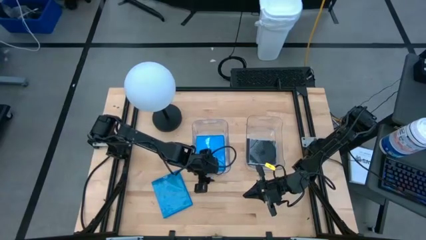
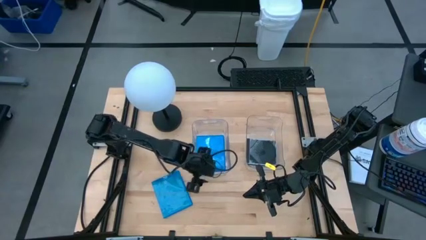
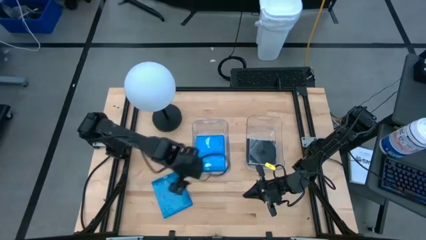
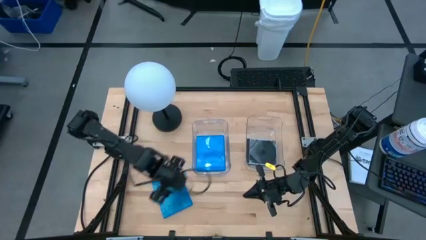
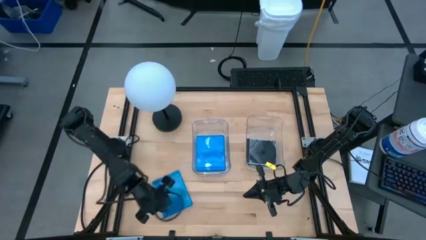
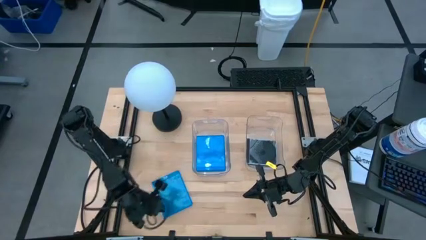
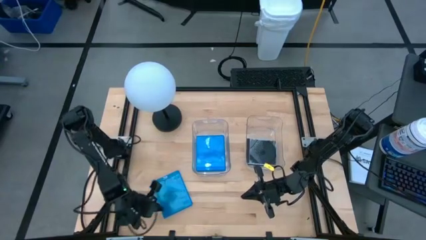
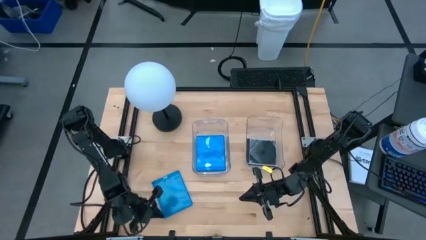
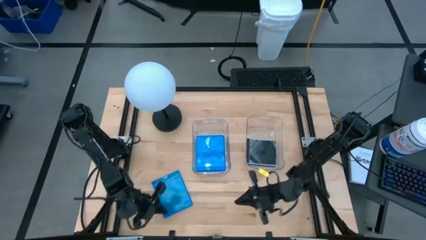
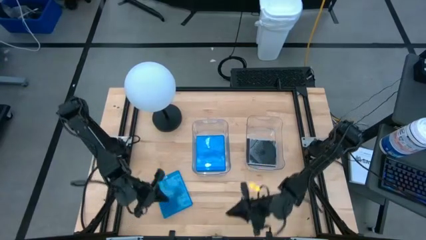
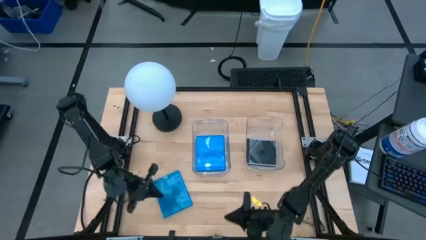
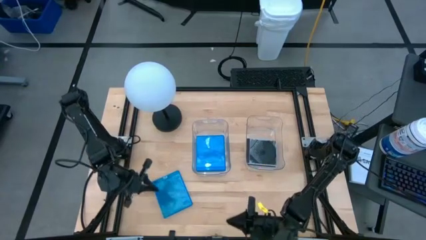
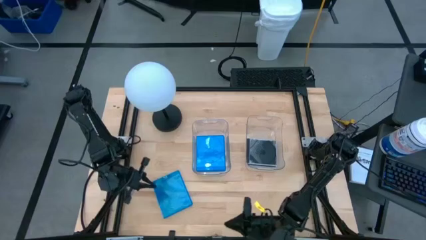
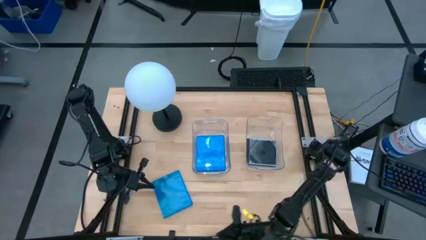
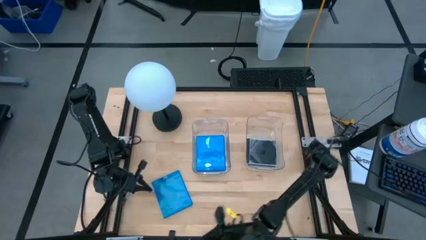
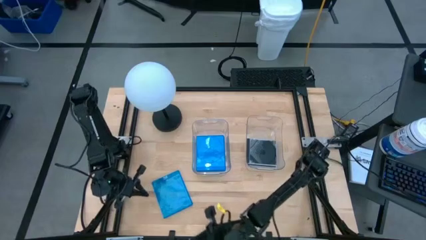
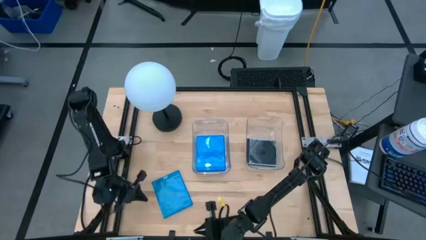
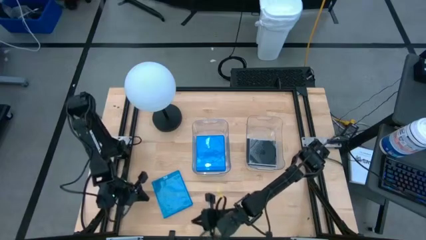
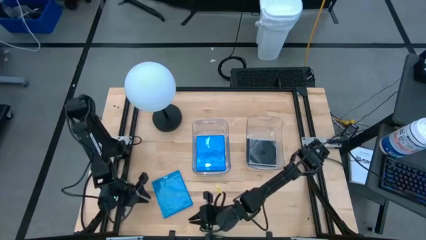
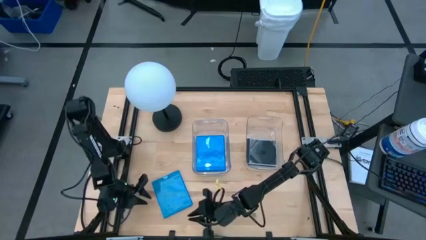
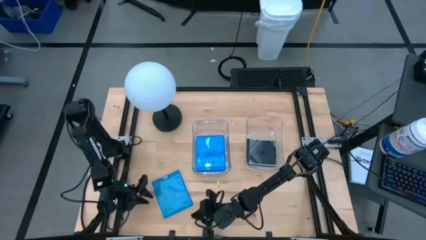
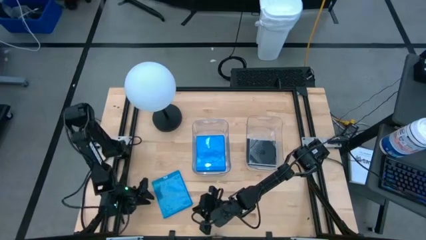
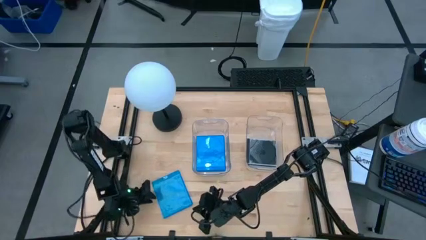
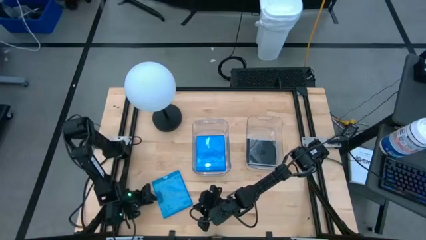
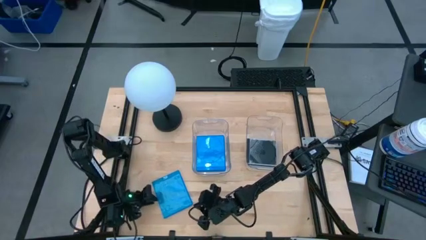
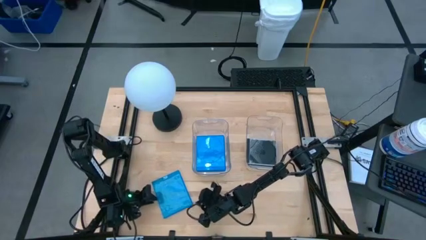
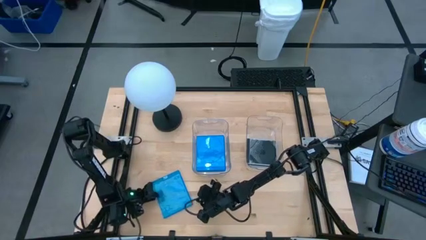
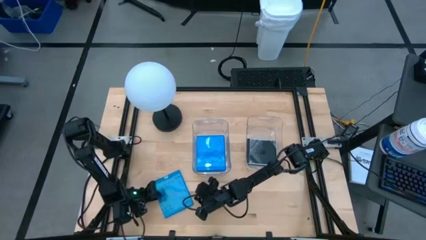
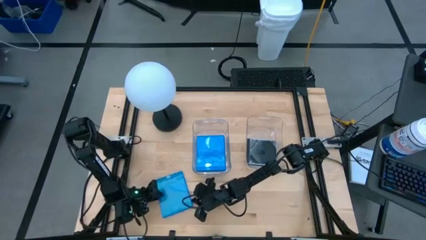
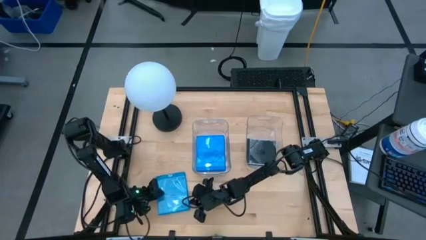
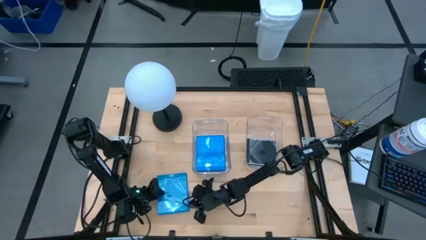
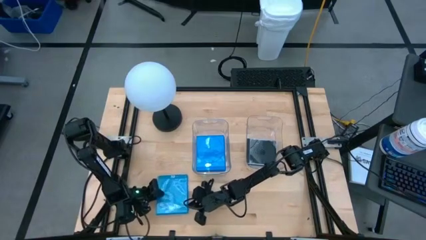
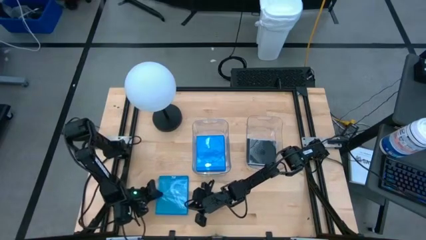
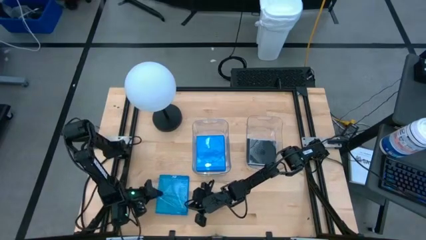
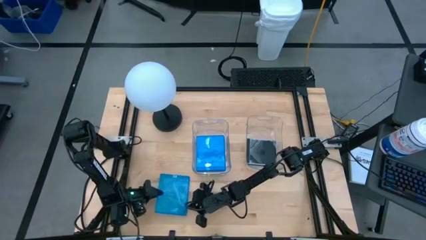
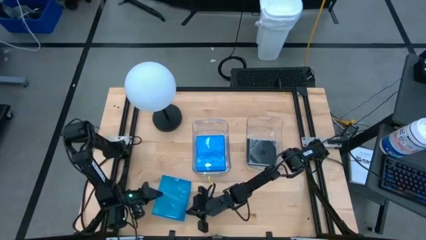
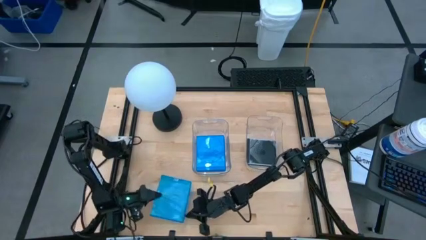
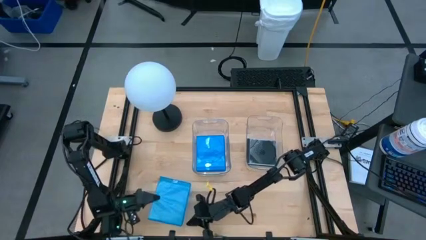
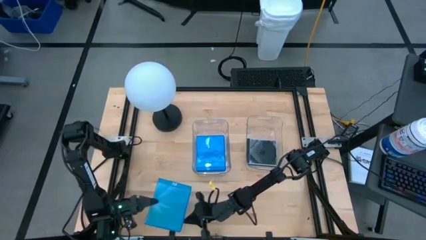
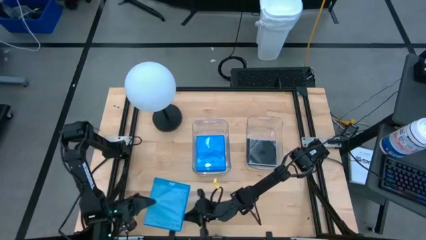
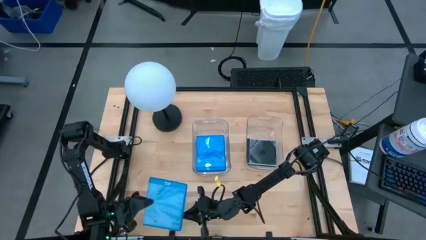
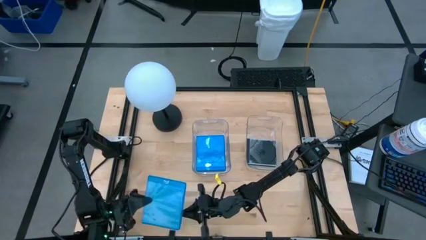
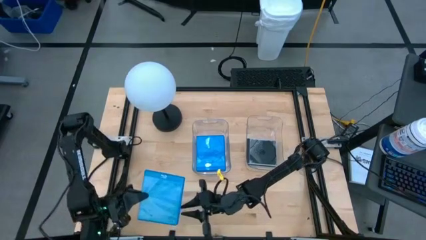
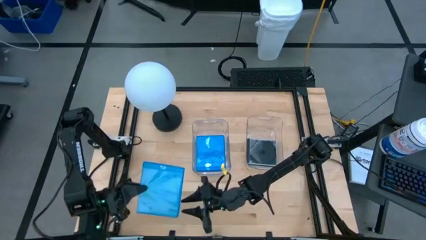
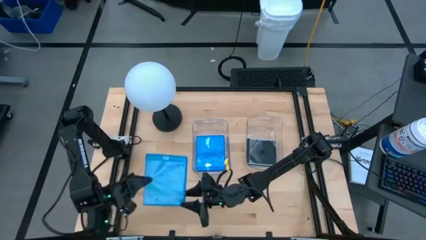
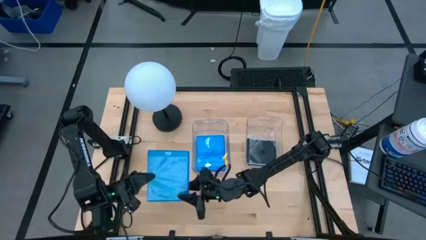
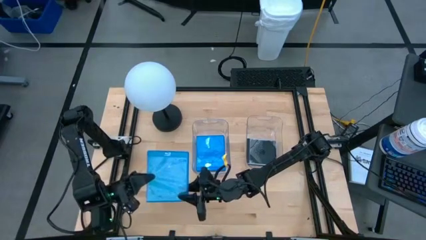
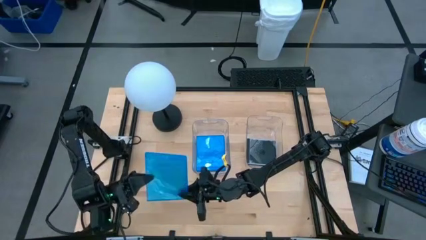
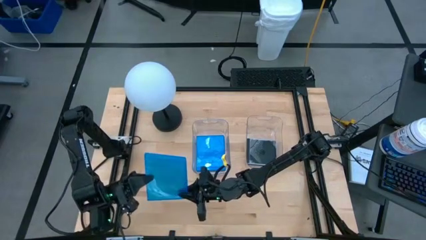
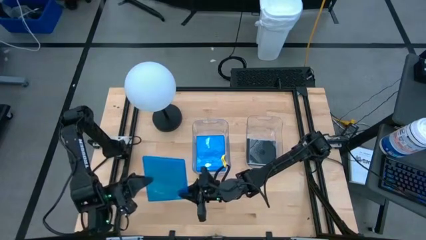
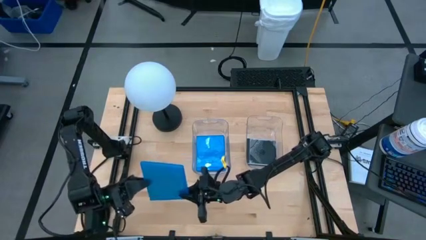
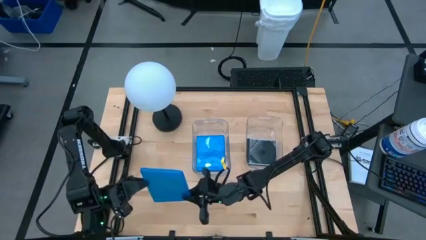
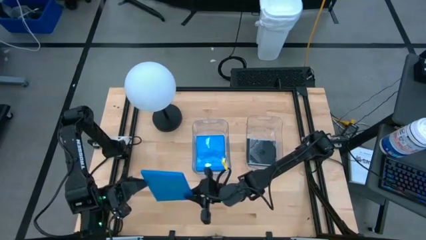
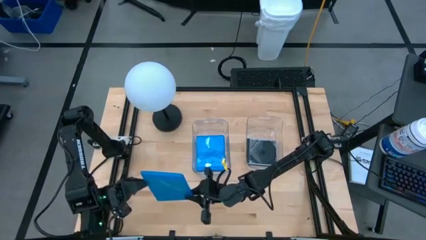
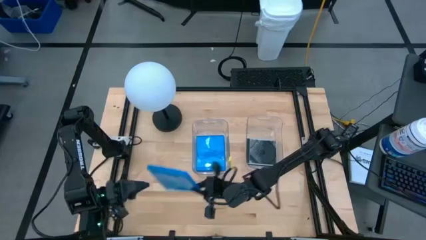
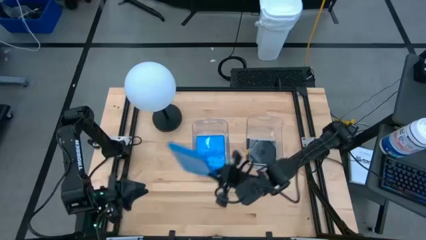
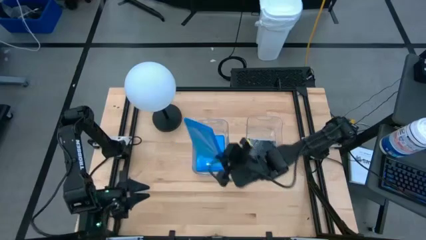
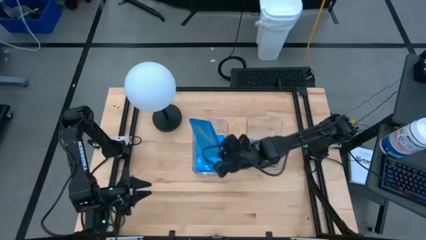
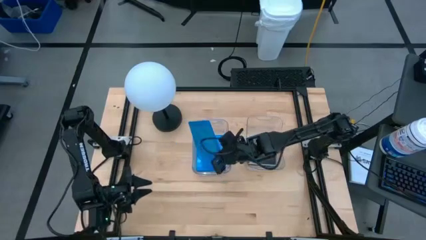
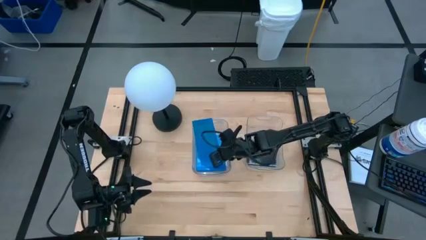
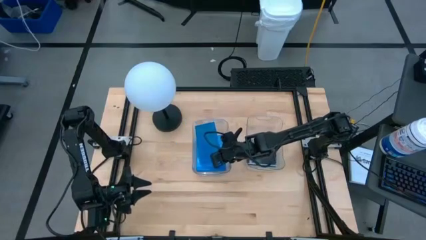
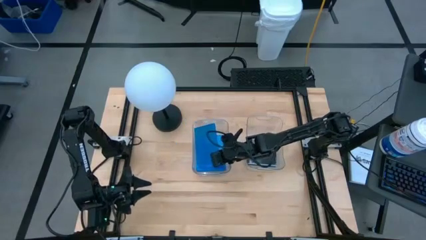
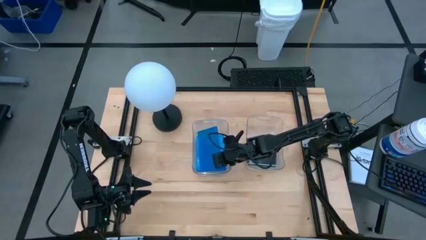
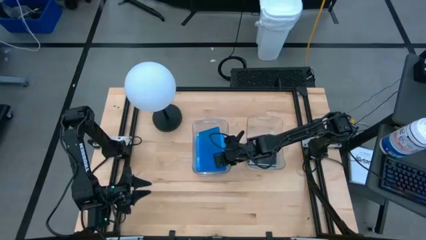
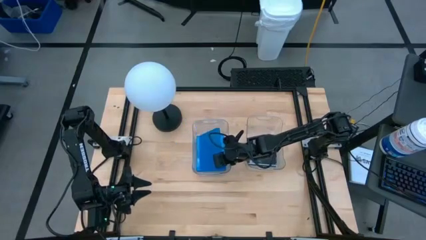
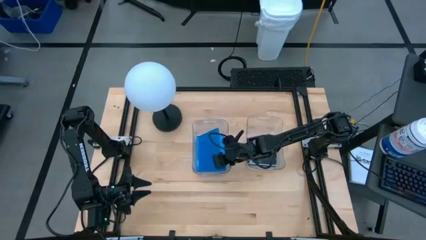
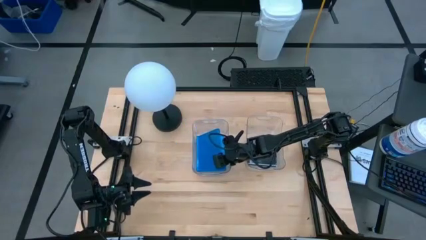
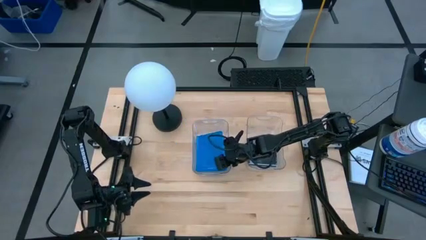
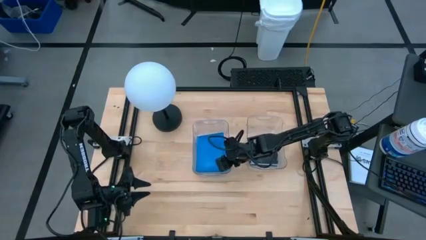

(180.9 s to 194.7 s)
Task: Pick & place jewel cases by type
Put the blue CD case into the left transparent bin

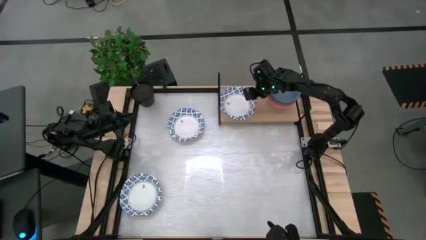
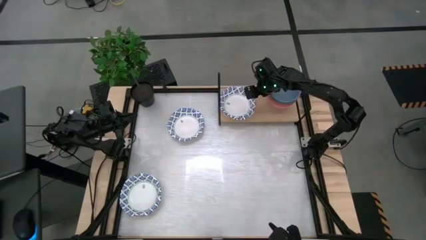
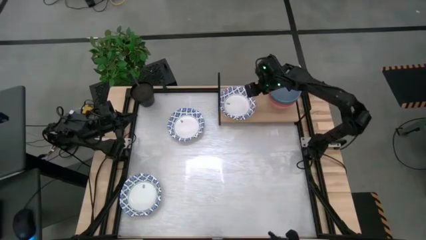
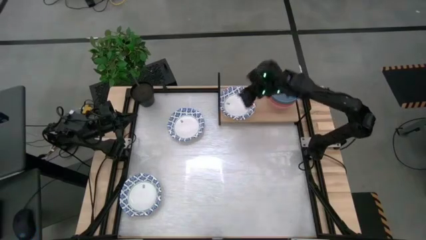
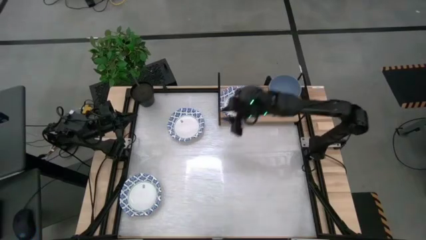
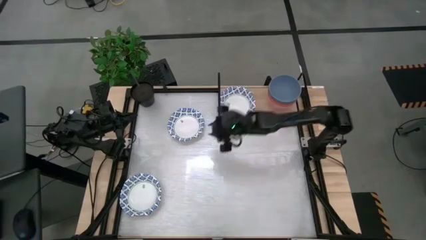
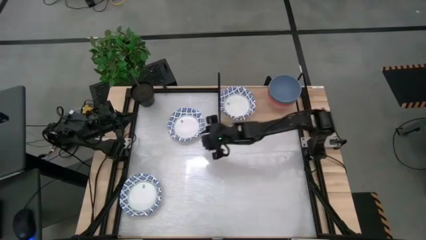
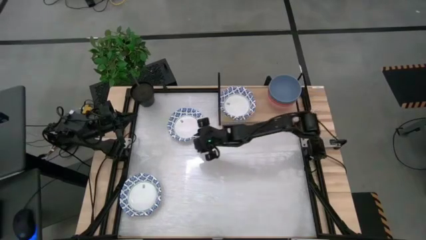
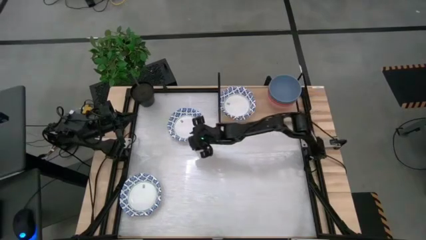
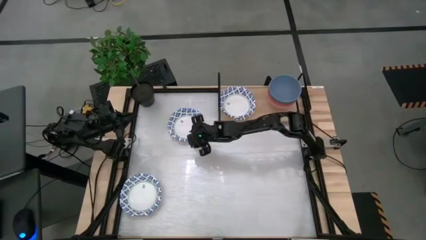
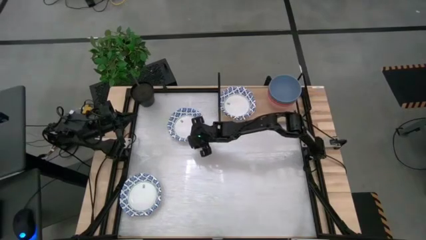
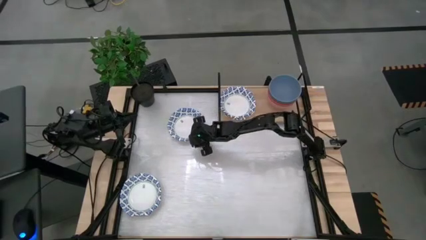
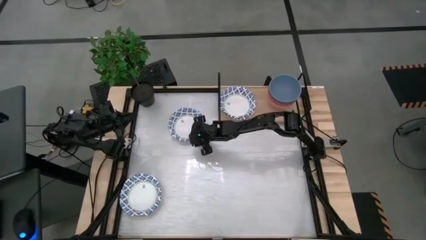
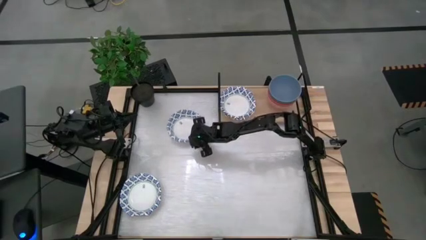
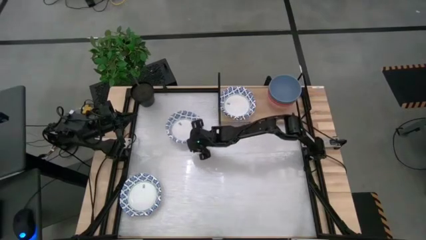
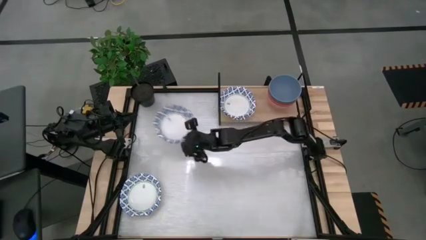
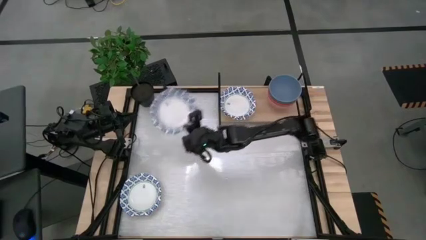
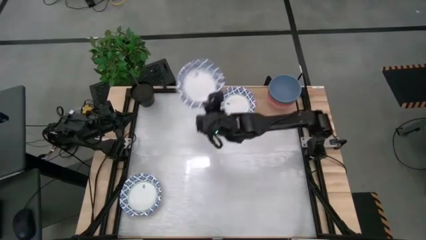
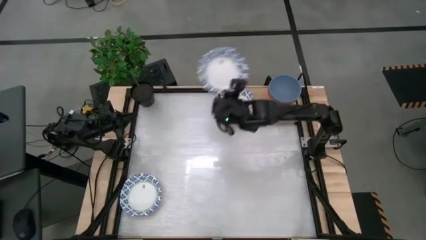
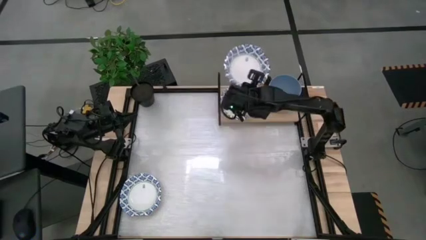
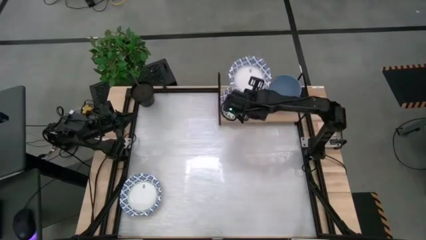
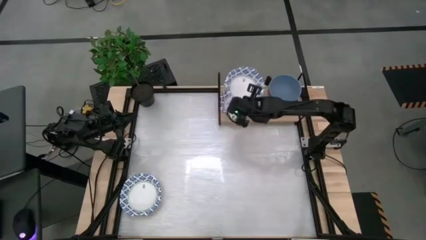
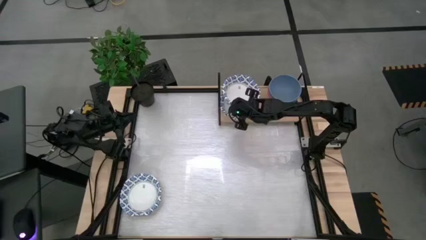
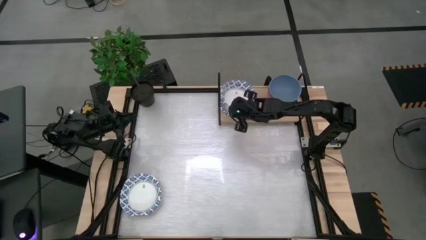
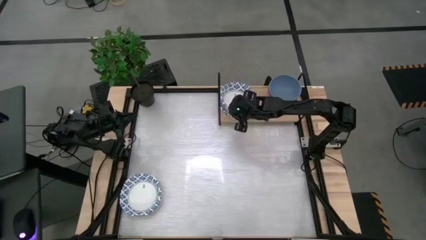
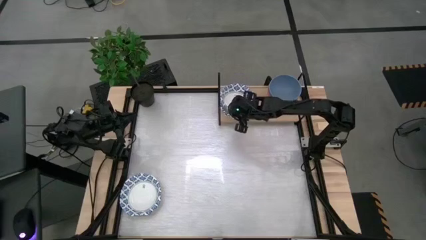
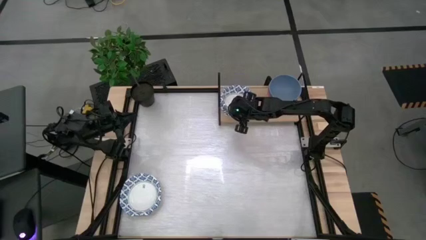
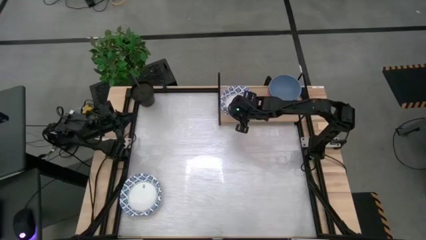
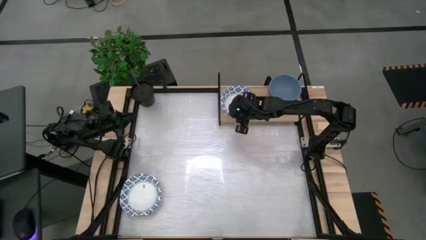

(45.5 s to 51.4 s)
Task: Place and stack bowls onto a shelf
Stack the top blue pattern bowl on top of the other blue pattern bowl on the shelf
